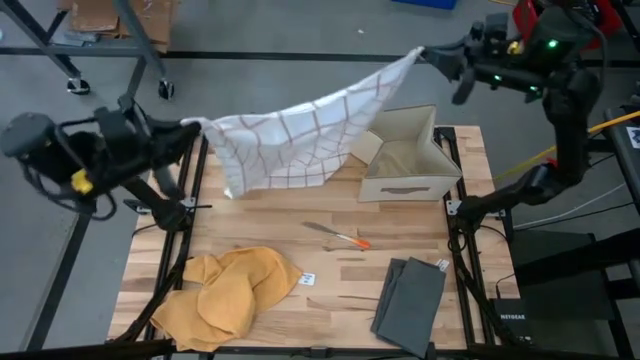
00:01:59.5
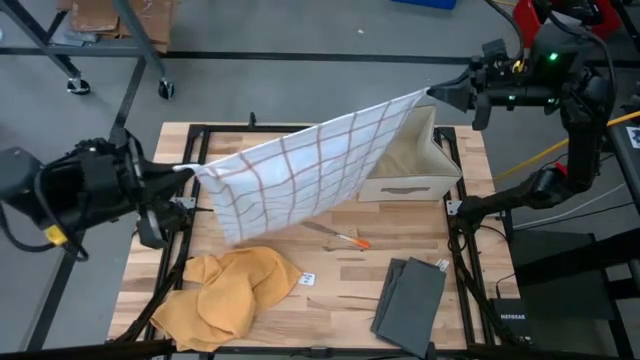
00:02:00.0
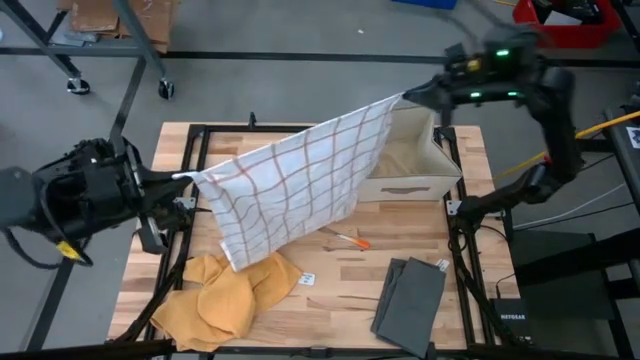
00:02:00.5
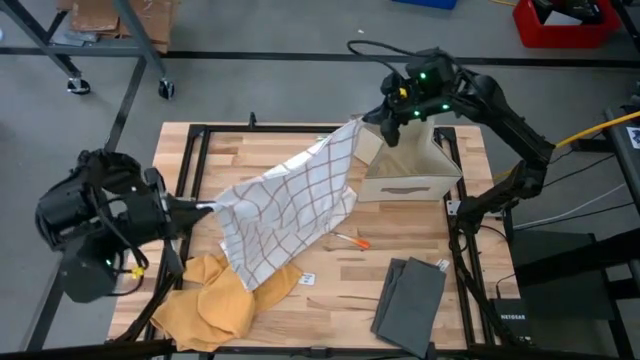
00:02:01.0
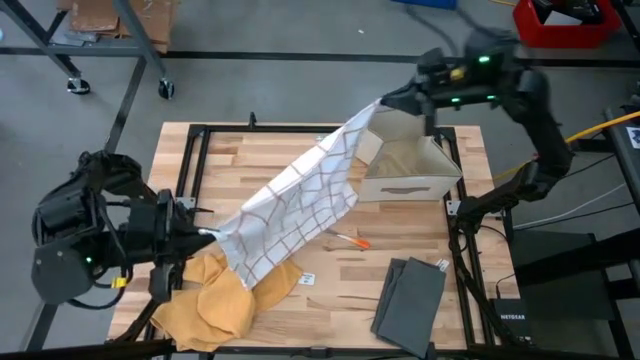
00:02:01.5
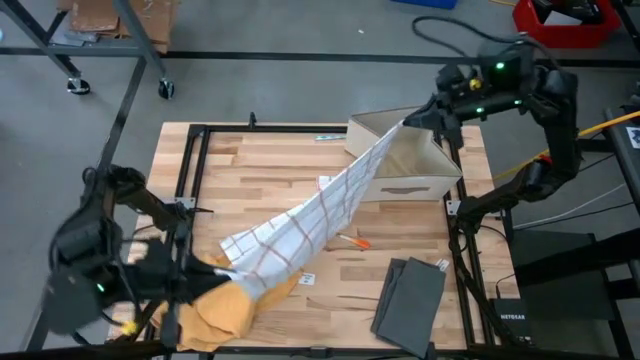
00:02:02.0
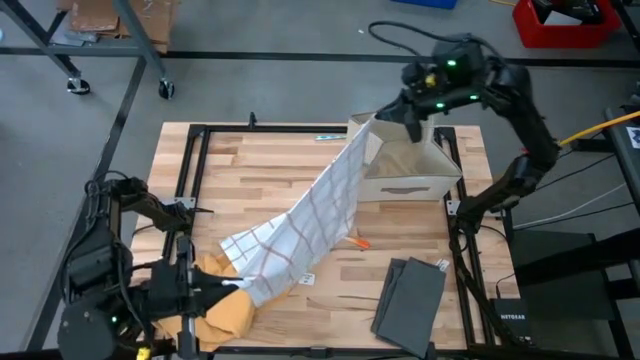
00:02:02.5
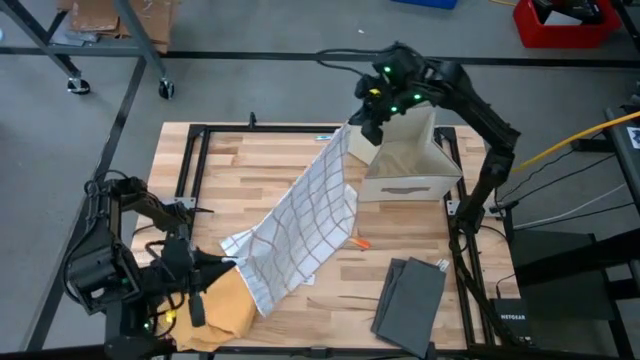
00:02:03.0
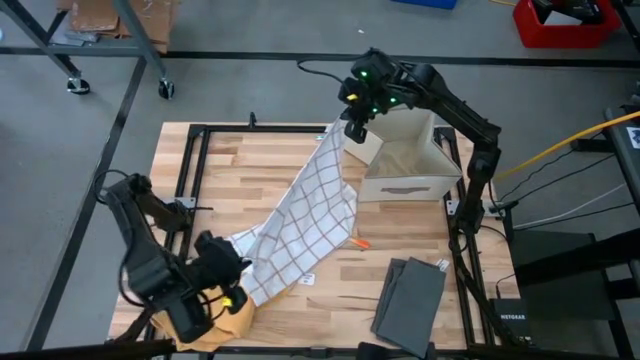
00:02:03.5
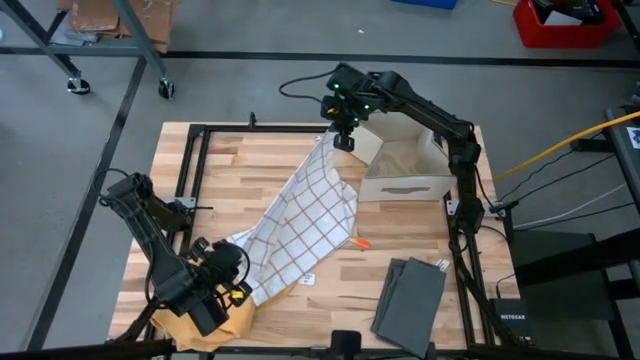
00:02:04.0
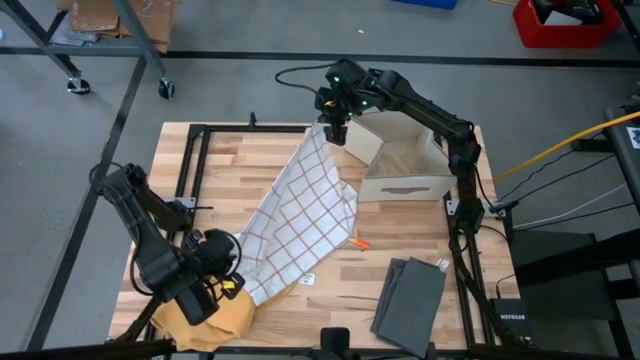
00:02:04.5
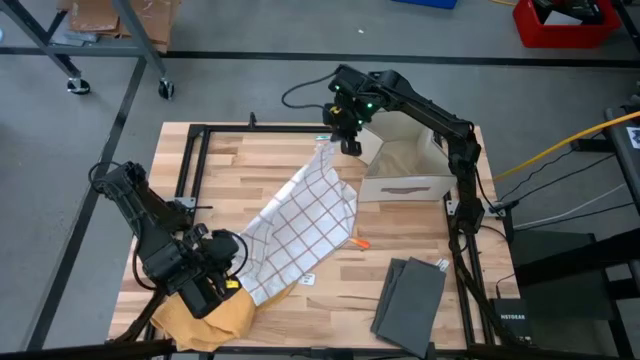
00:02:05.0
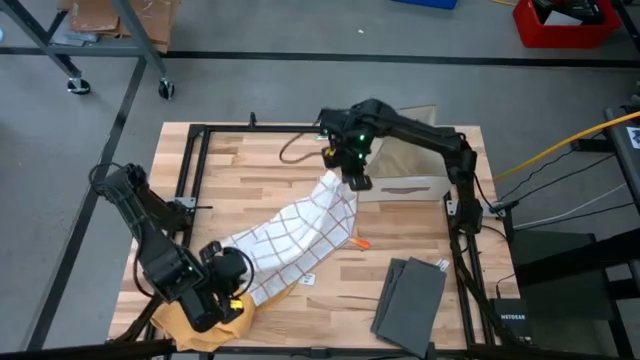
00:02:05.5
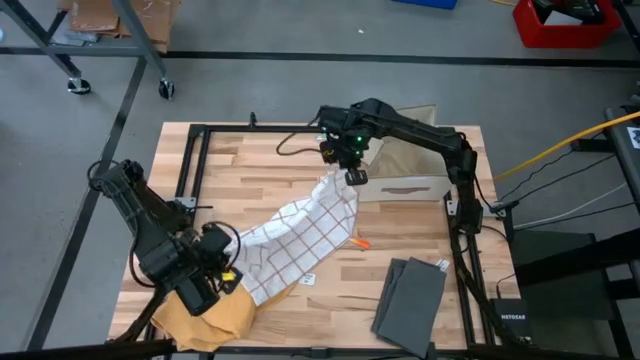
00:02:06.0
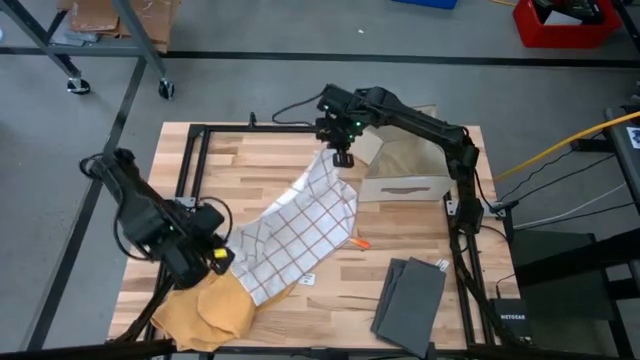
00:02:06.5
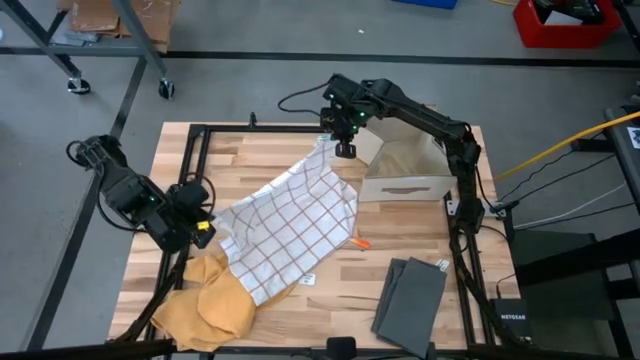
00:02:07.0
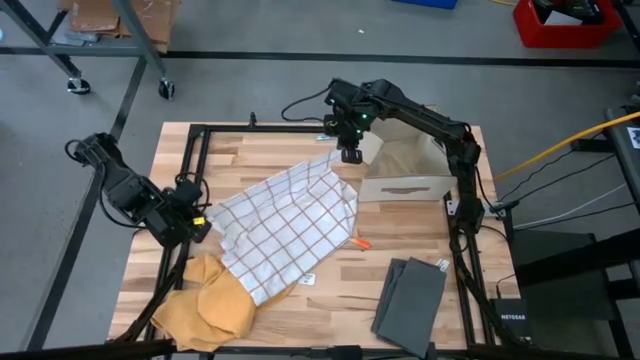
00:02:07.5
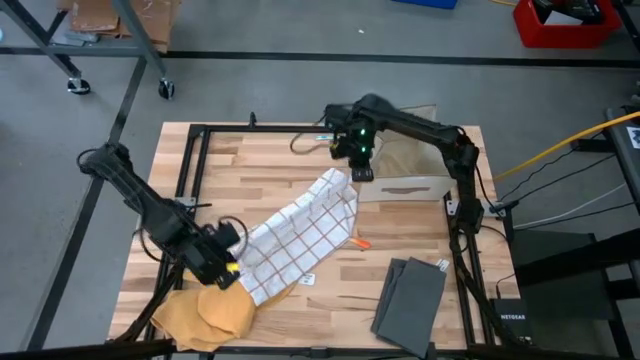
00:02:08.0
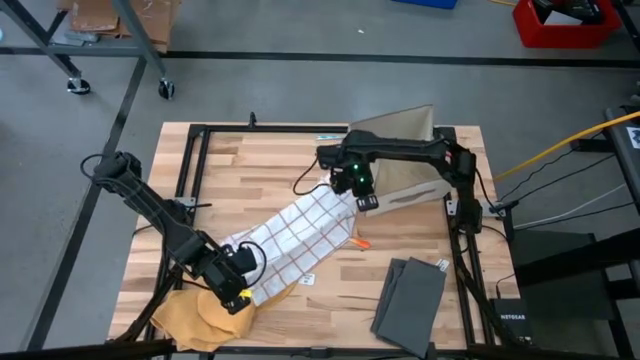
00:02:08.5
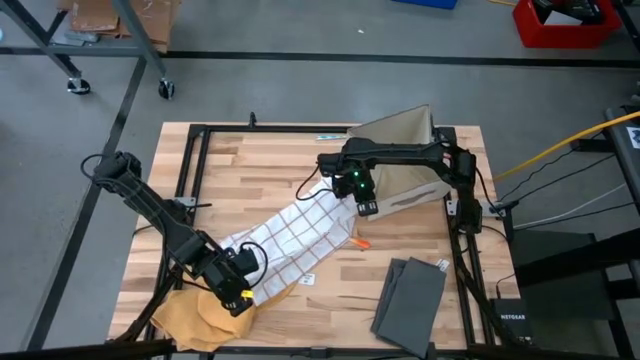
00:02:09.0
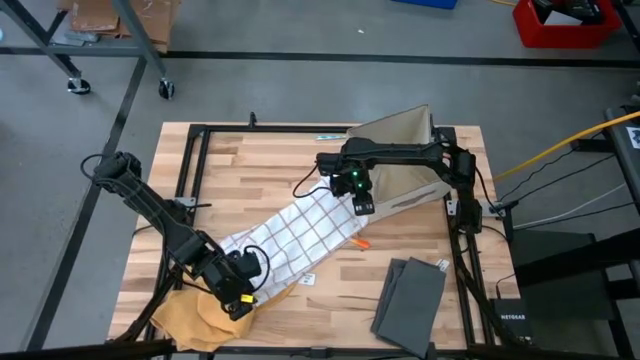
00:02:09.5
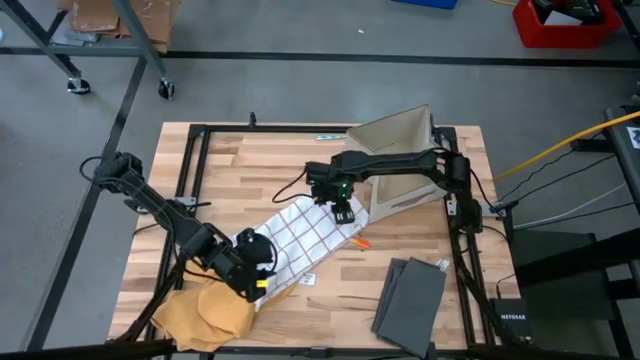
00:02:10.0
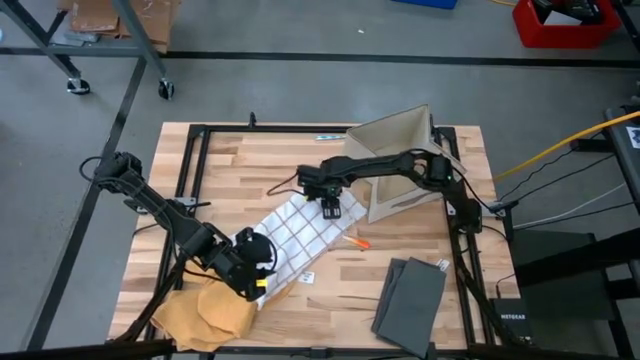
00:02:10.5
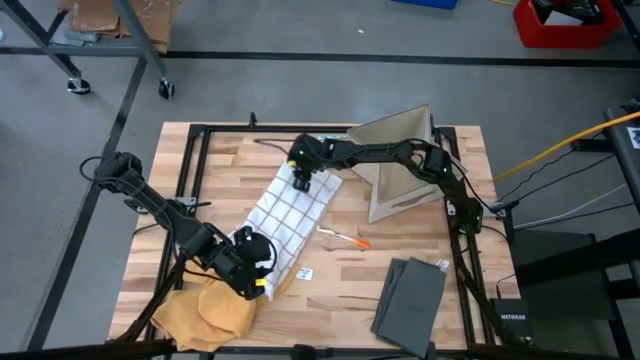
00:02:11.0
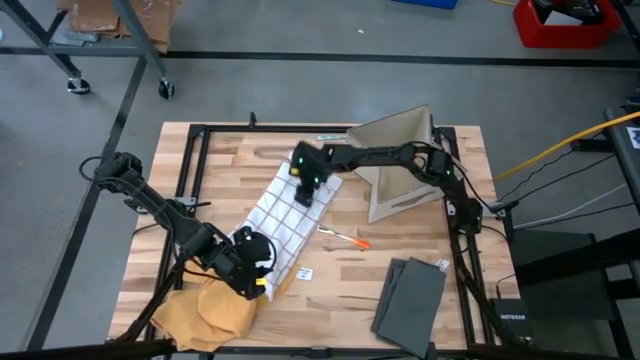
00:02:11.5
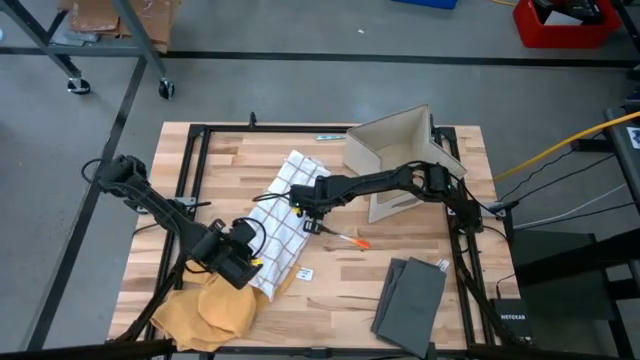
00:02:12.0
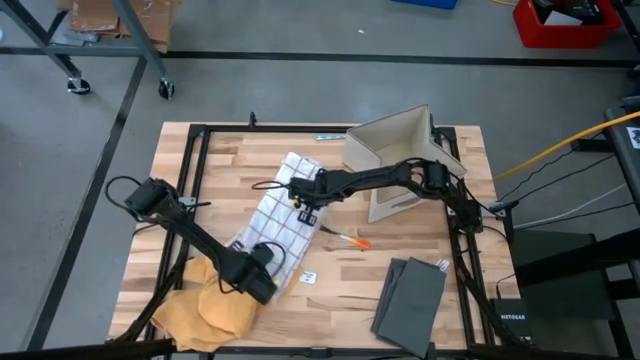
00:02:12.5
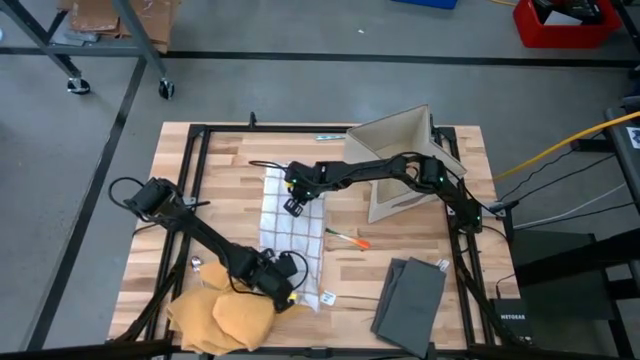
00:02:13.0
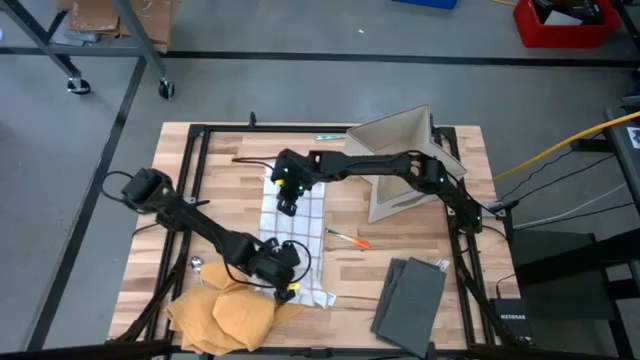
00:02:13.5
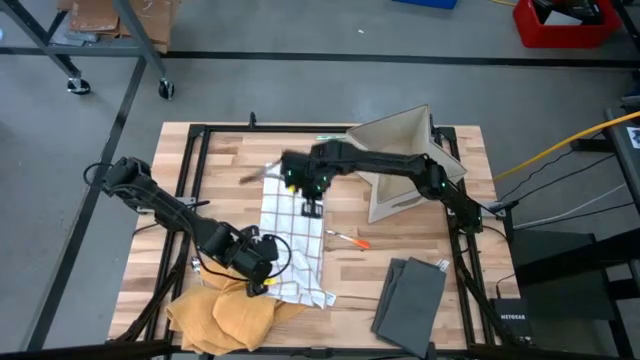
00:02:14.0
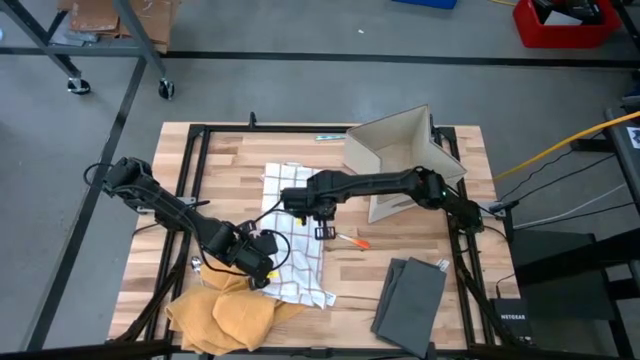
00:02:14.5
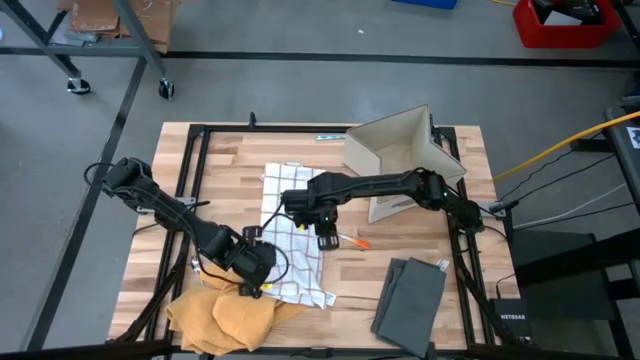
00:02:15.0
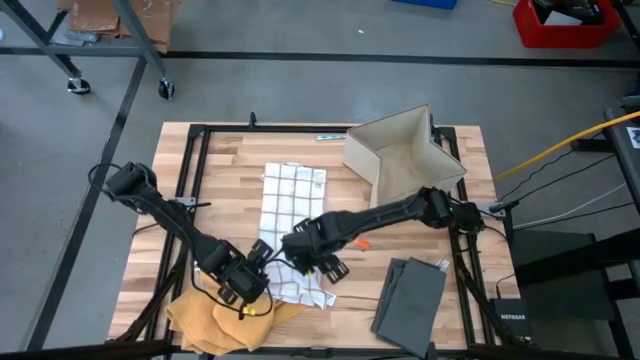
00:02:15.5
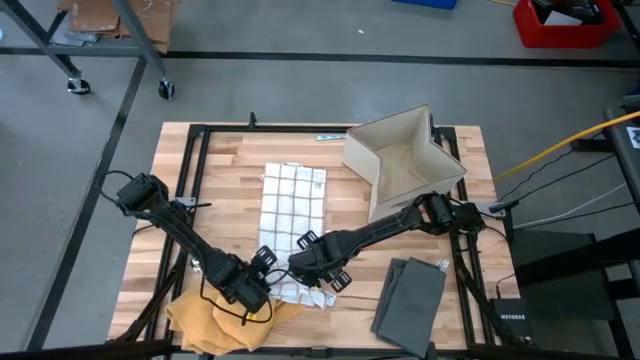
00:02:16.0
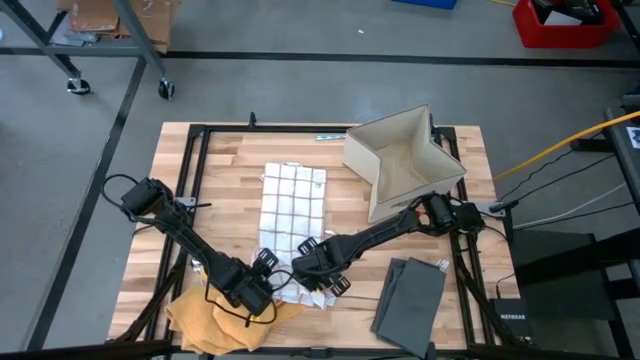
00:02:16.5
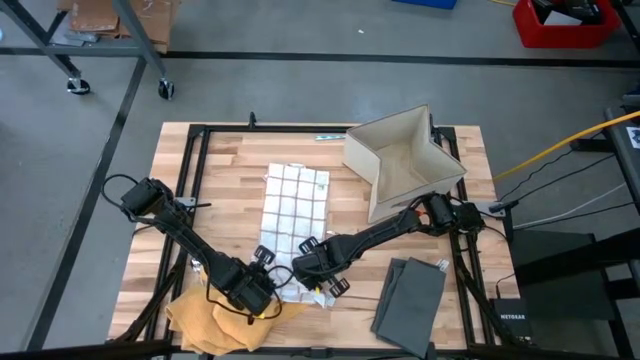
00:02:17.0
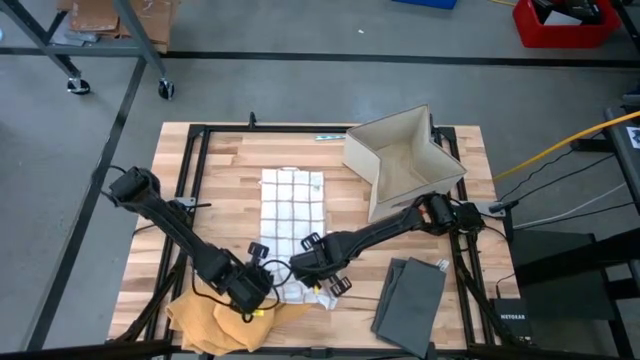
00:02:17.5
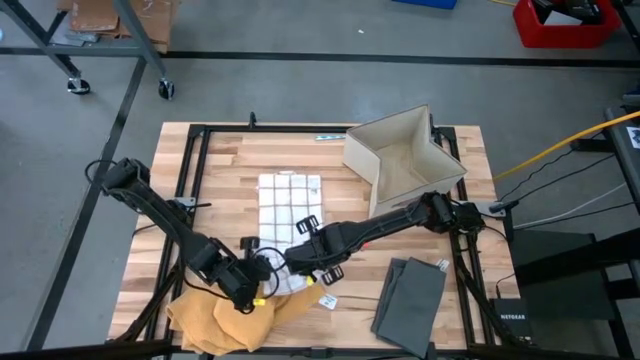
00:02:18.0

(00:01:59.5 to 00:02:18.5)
Task: Fold towel
Fold the white kitchen towel
